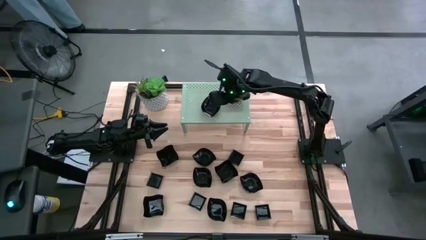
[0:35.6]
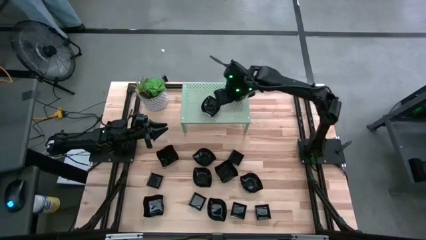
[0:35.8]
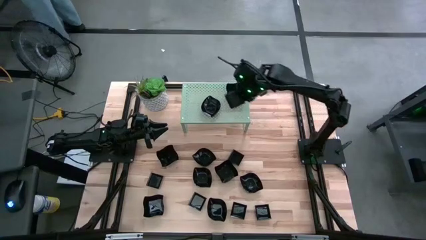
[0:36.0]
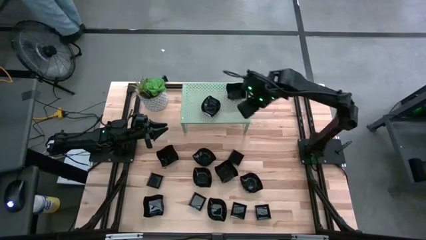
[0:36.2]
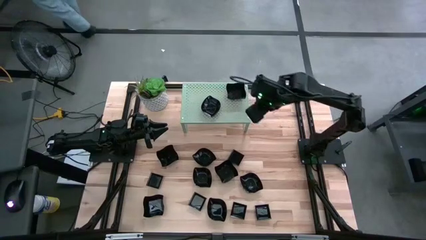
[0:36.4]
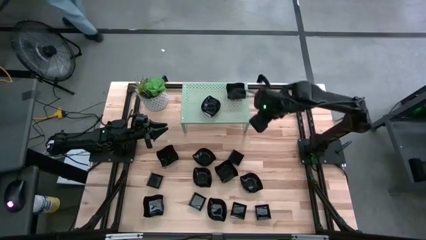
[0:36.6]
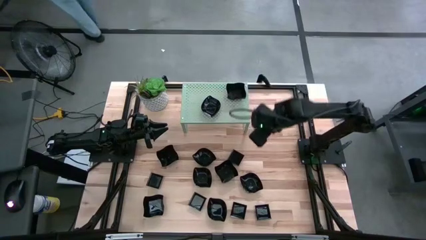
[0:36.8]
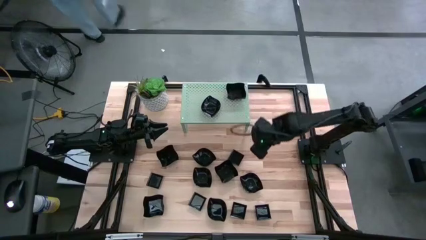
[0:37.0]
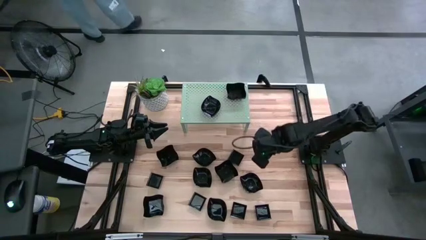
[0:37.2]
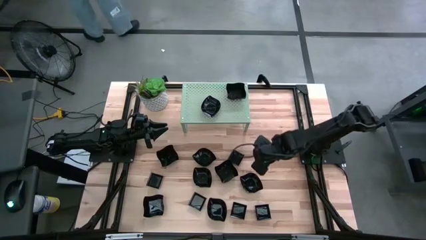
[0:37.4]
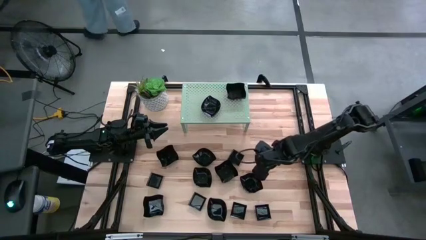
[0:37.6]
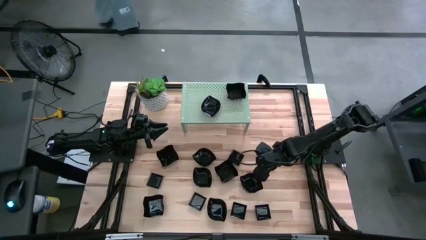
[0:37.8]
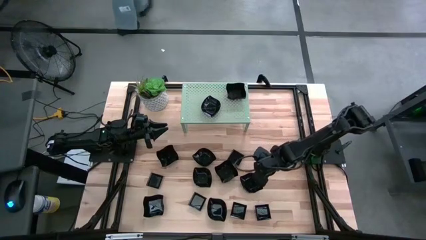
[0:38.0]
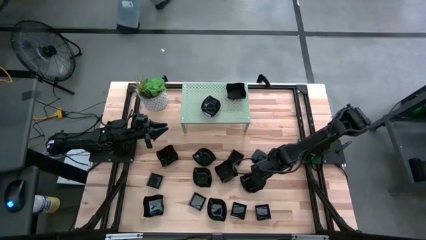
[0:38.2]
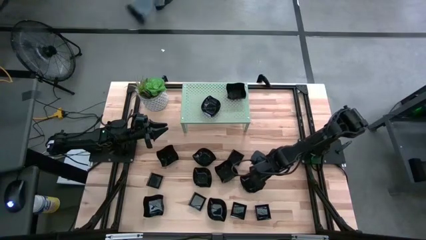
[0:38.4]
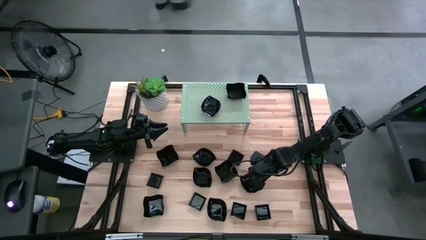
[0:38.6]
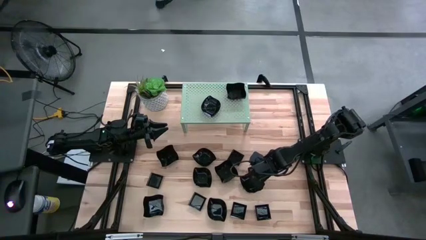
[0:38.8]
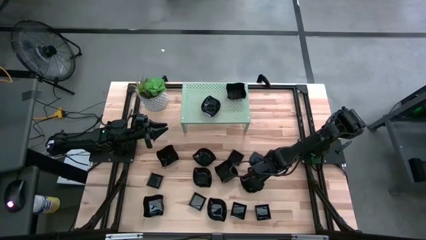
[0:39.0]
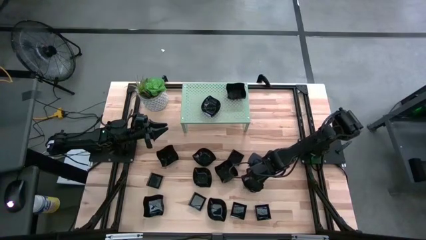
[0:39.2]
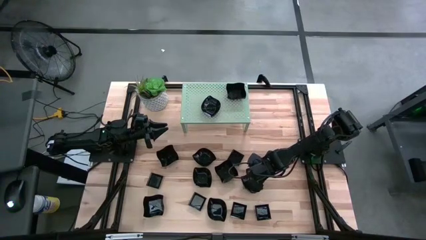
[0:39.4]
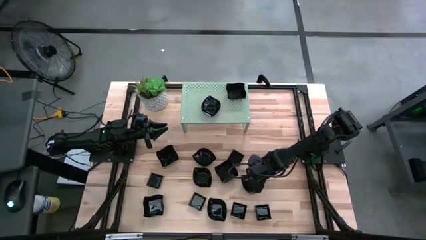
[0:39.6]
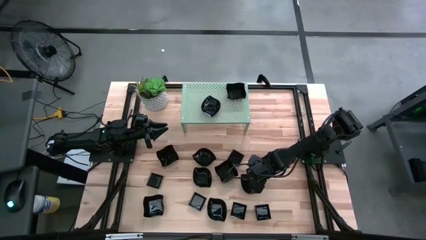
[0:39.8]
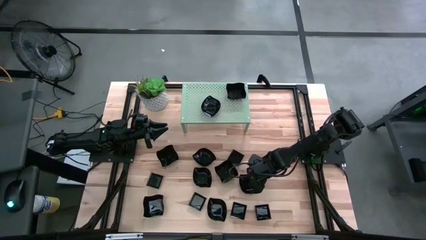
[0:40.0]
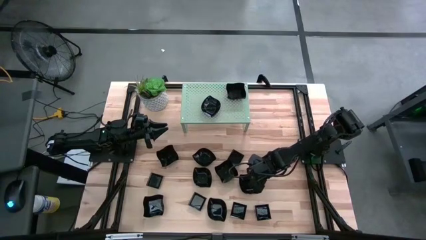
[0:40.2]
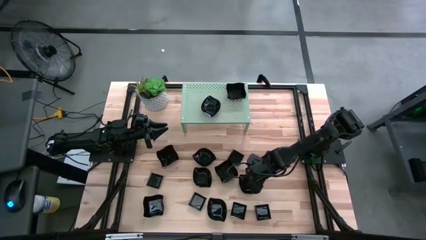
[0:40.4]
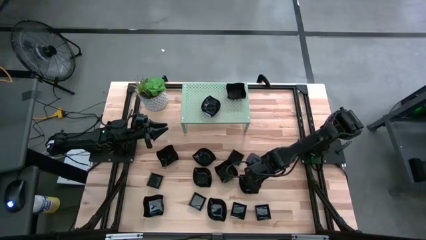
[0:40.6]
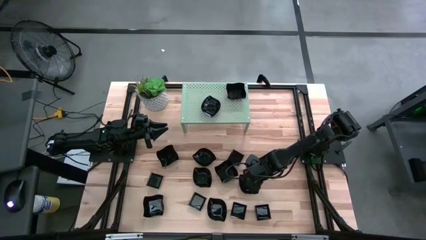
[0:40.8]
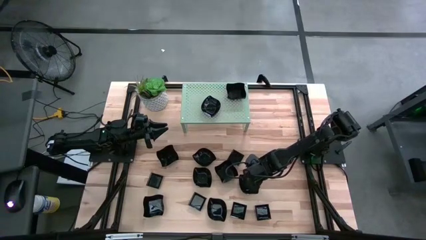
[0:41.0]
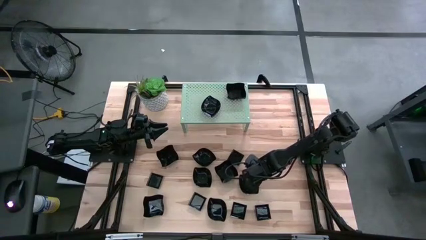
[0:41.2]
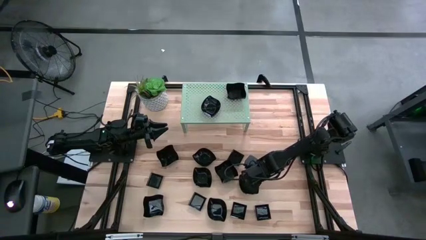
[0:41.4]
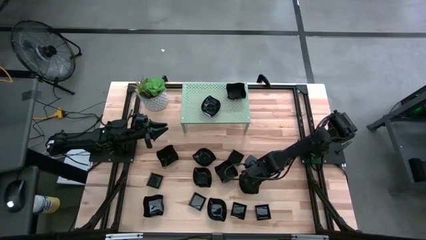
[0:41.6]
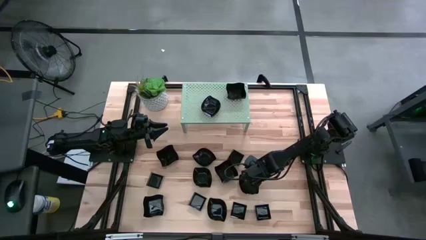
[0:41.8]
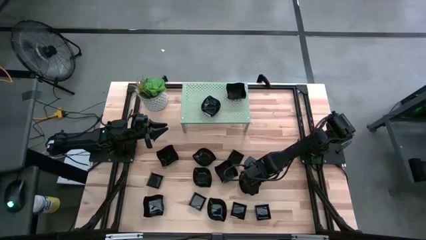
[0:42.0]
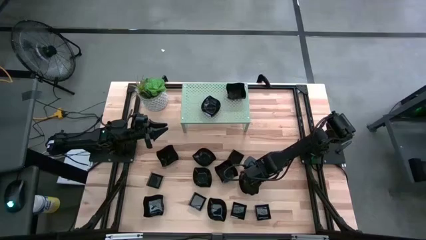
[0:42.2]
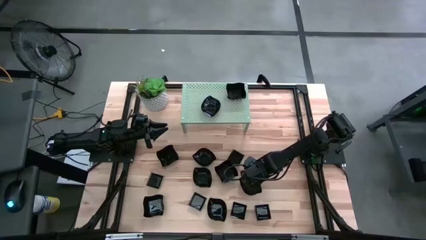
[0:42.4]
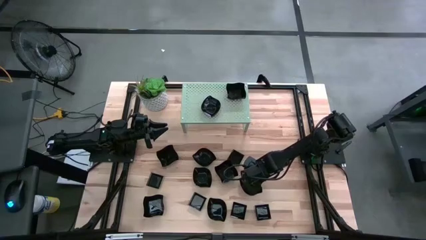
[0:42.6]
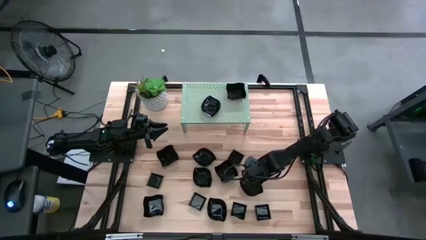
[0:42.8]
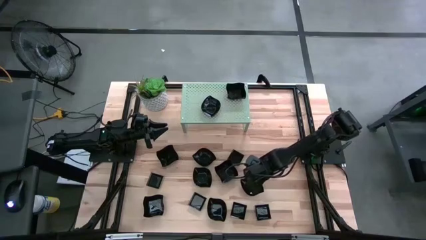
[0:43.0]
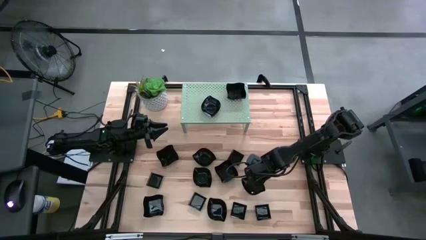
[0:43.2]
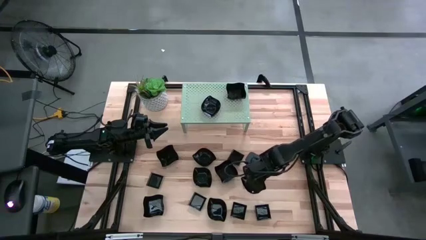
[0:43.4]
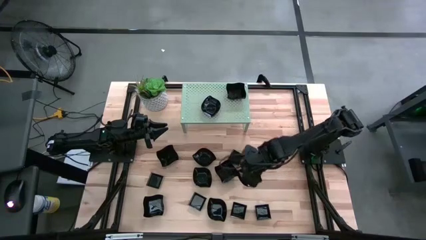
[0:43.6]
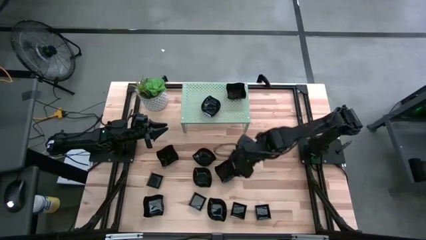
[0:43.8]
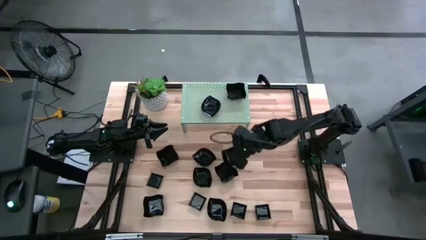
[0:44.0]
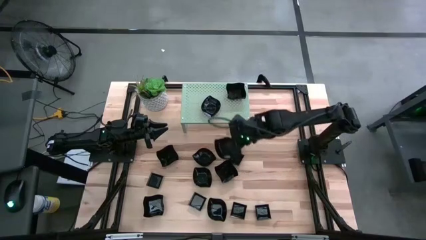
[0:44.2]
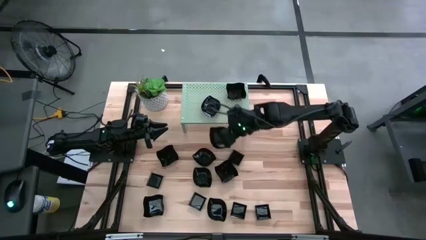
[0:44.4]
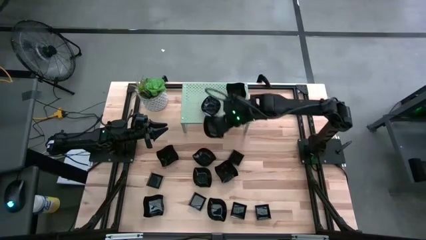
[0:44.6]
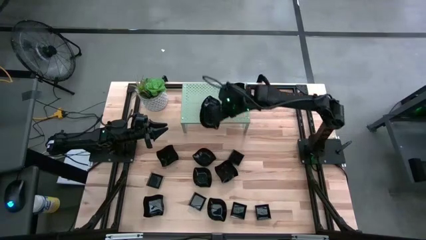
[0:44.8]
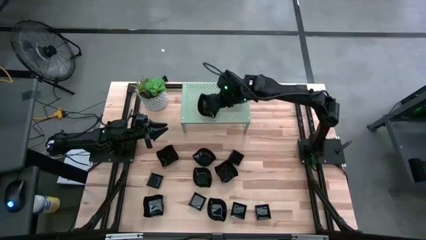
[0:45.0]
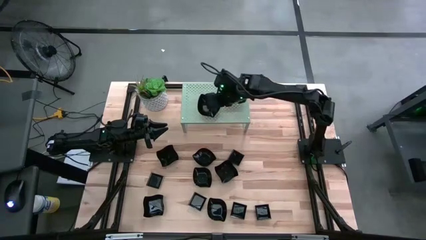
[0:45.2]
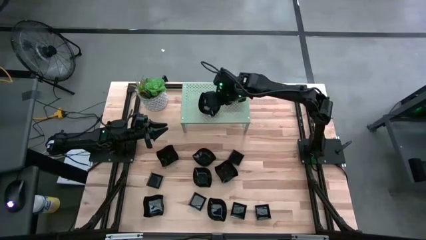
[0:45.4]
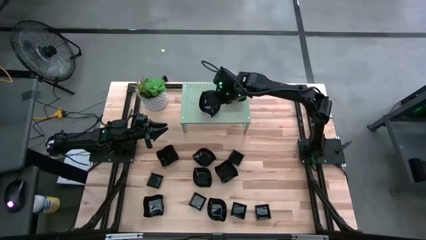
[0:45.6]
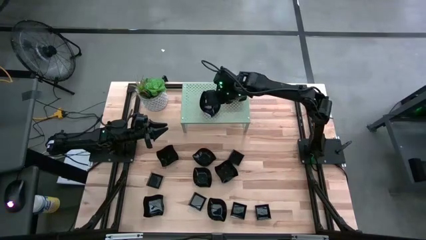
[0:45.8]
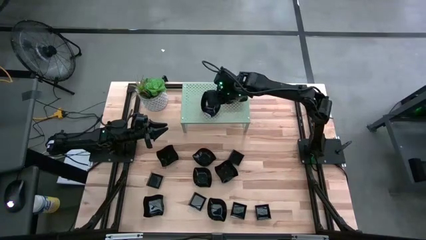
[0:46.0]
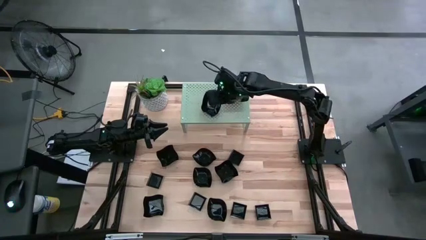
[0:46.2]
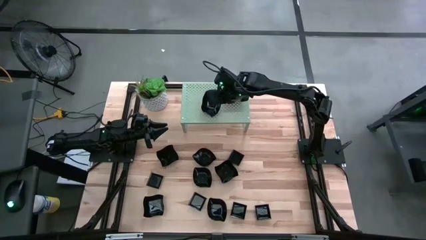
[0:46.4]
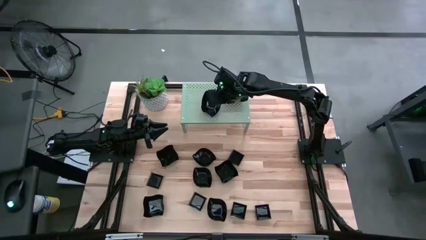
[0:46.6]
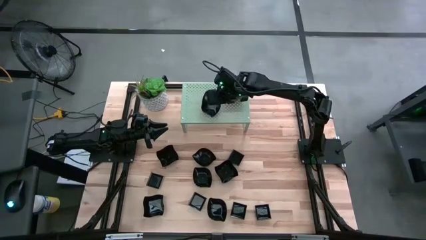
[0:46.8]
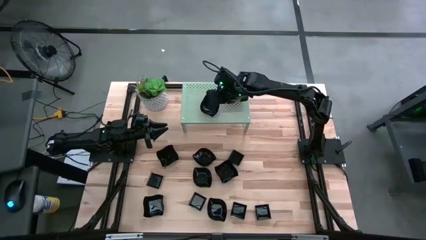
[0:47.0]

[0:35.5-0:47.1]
Task: Pick & Place Mini shaped plates
Stack the leaf shaped plate on top of the leaf shaped plate on the shelf

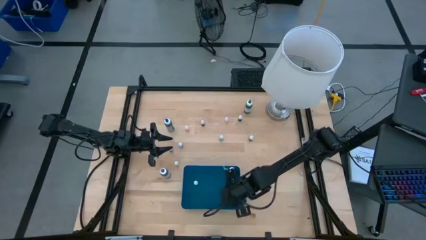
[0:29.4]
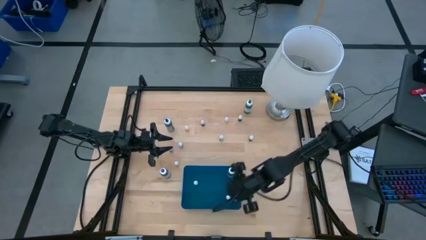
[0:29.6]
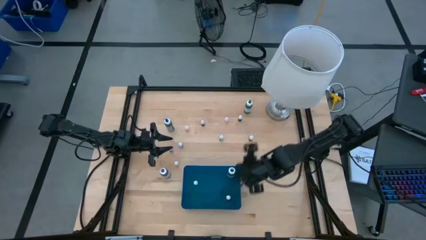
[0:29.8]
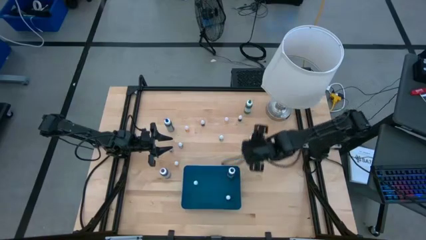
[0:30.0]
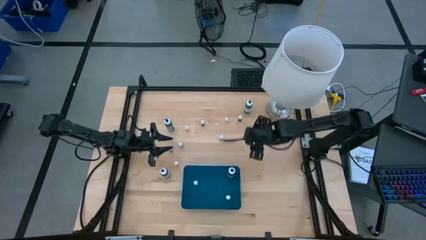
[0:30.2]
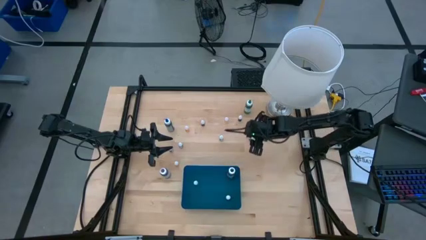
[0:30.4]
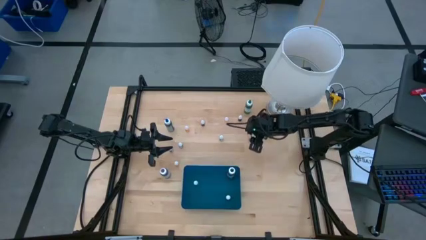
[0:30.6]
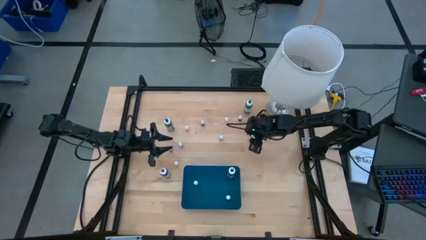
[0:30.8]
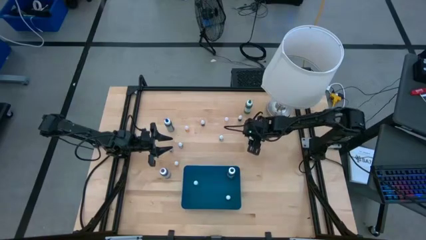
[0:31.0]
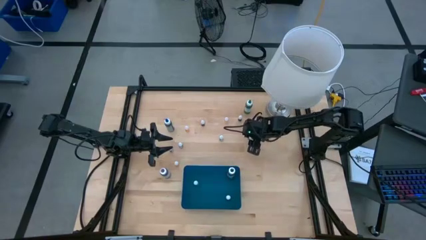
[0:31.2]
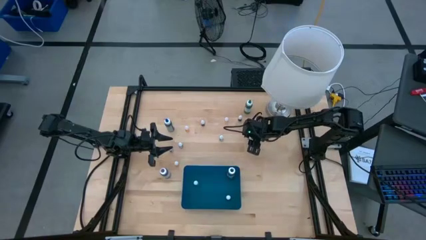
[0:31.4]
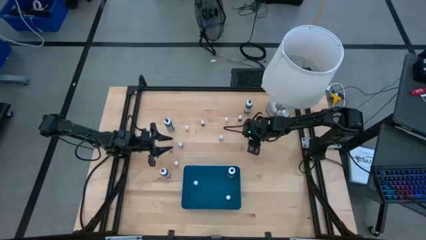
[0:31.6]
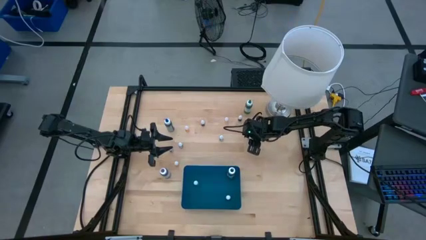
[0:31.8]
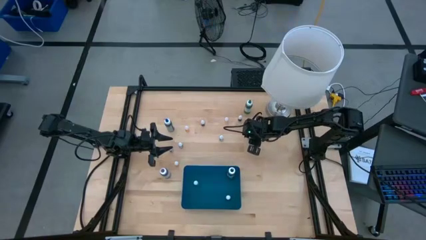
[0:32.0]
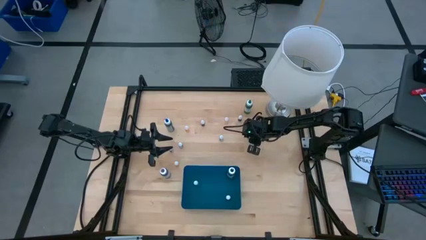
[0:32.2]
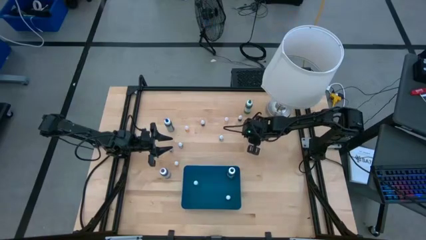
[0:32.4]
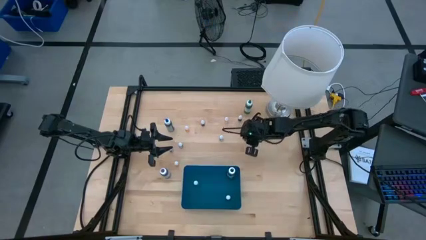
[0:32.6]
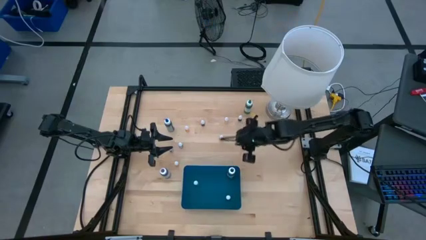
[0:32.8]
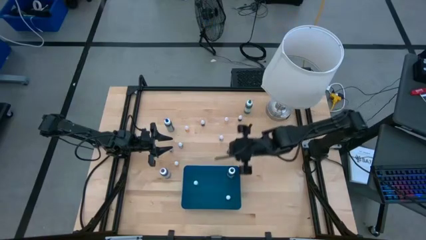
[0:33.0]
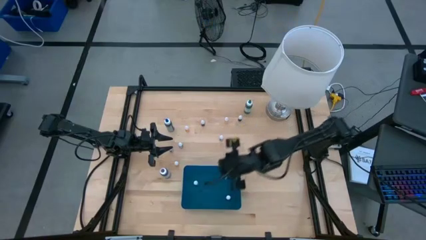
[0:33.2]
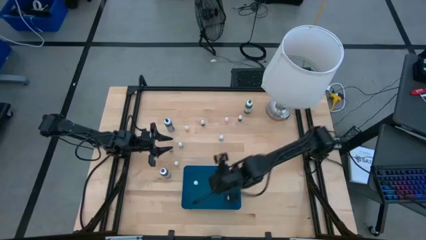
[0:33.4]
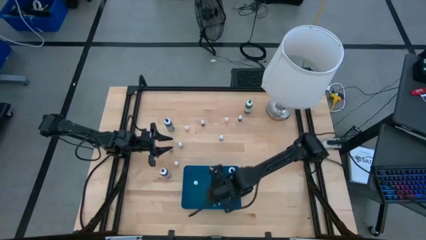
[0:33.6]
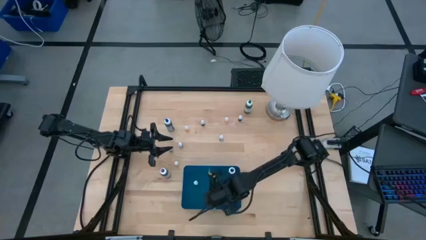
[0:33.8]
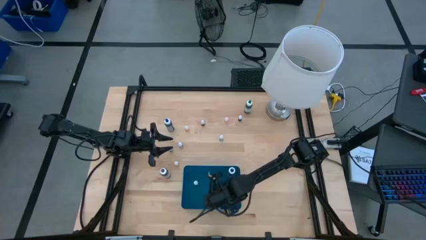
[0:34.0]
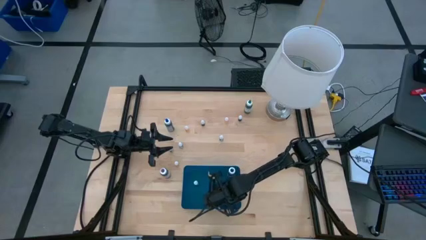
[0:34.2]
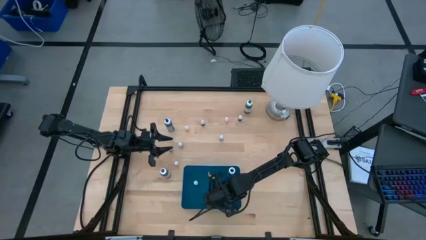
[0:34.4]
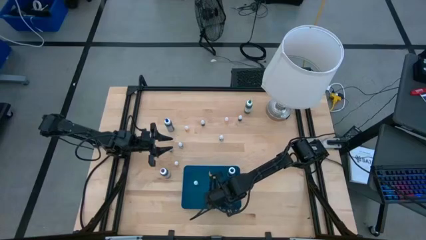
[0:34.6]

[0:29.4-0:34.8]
Task: Pick & Place food coloring
Put the right red food coloring bottle into the blue container
